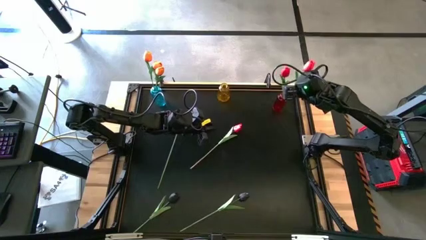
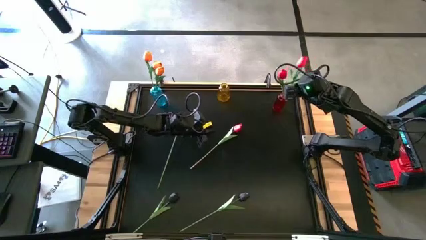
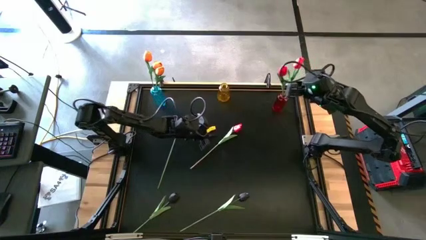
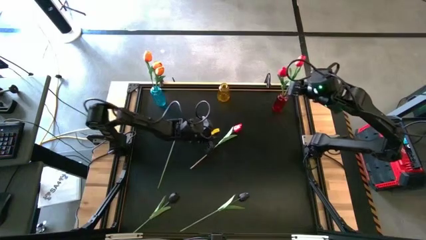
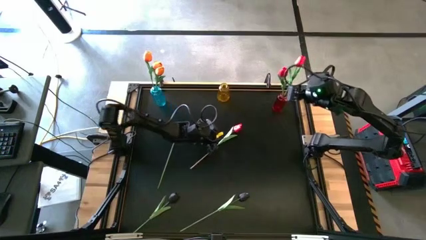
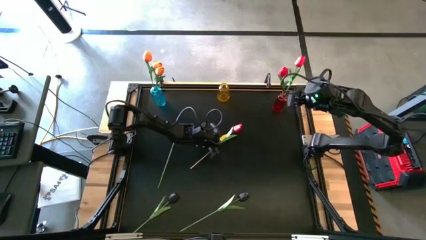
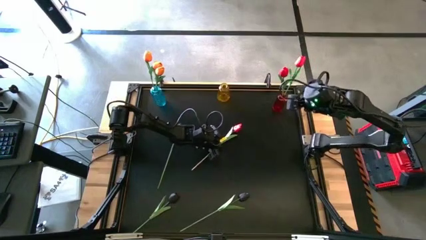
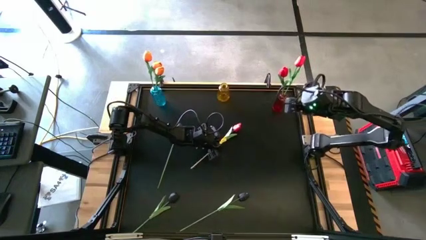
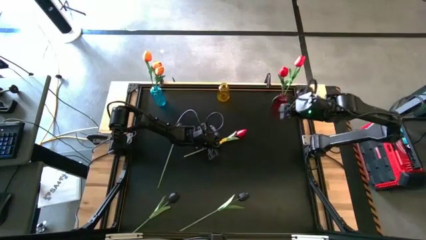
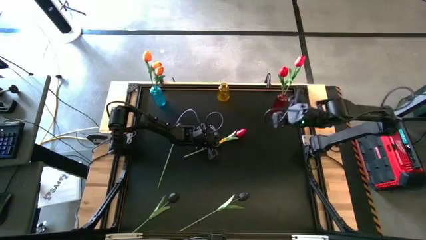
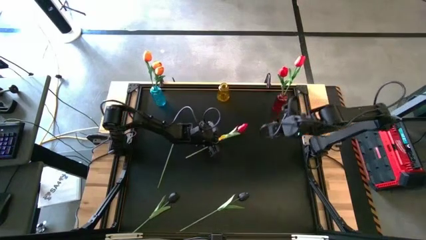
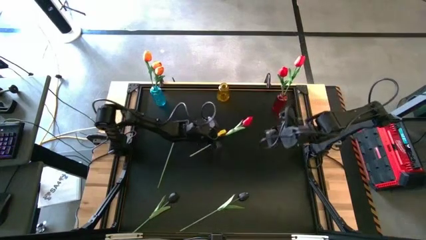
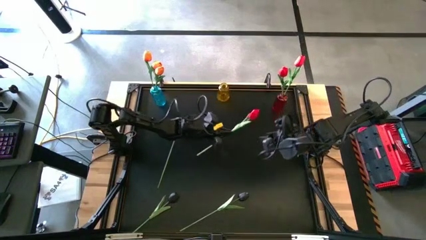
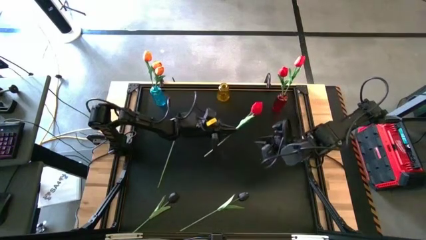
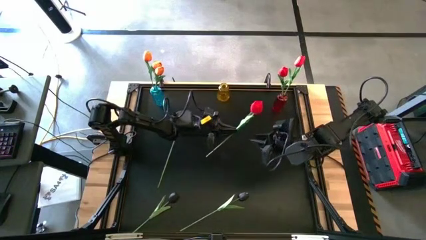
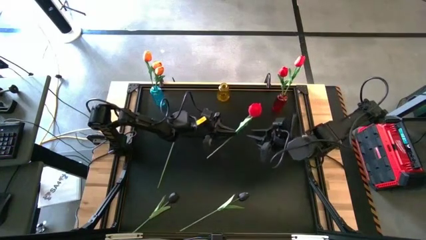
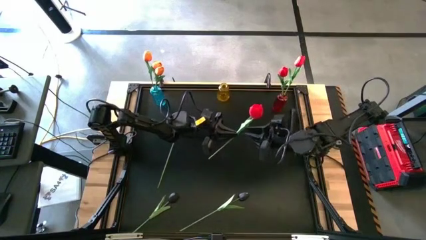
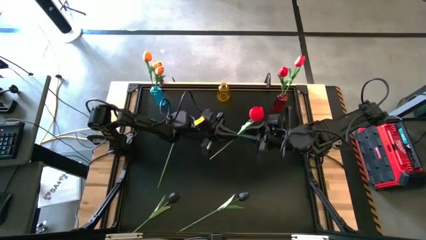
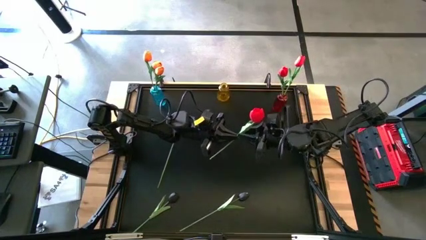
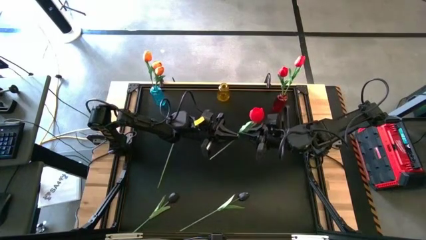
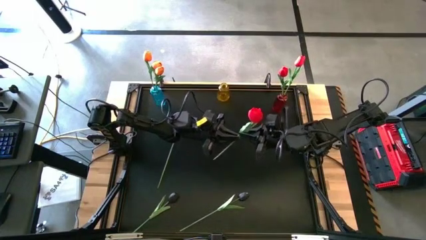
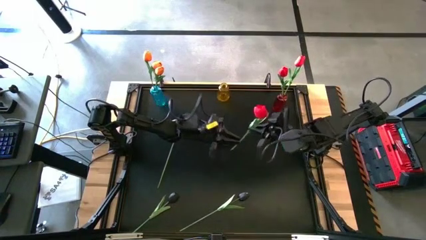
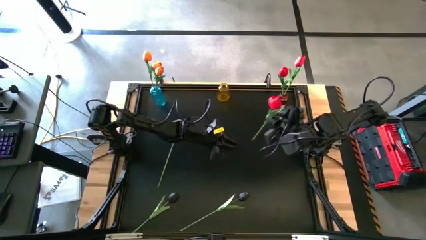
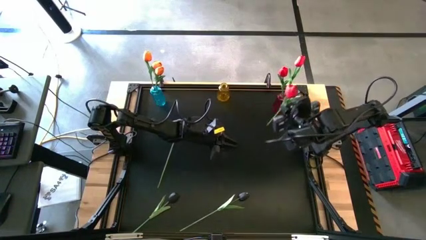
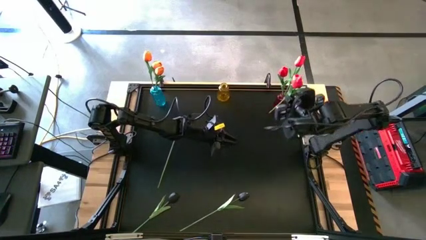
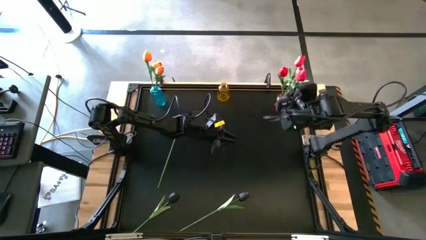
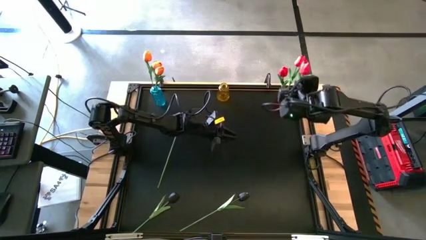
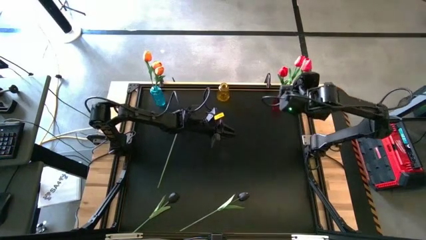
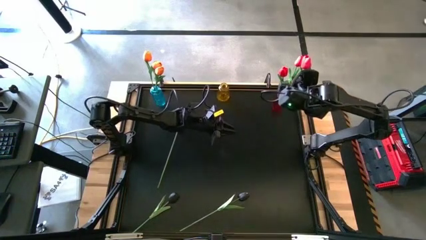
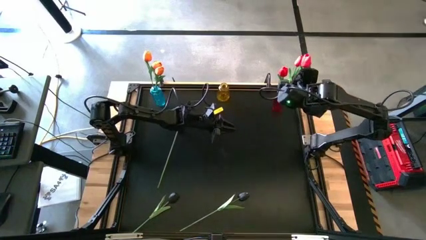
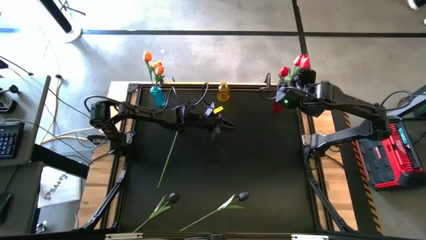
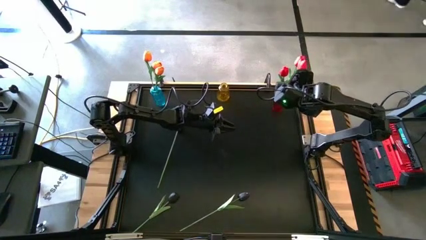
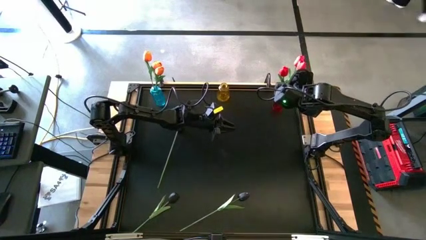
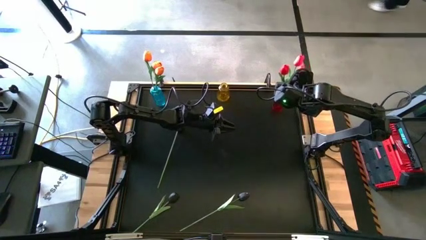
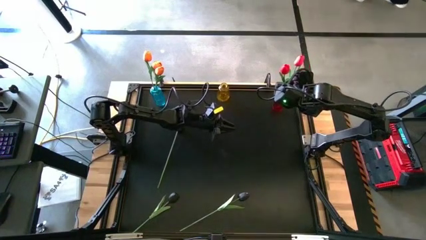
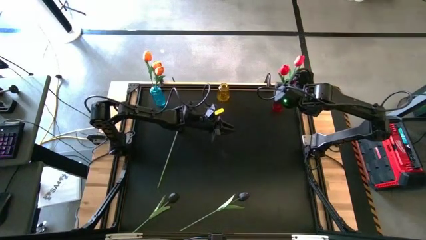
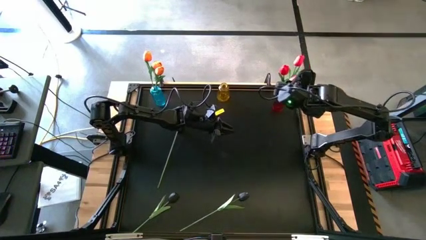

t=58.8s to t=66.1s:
Task: Sort flowers into vase by color
Put the red flower into the red vase

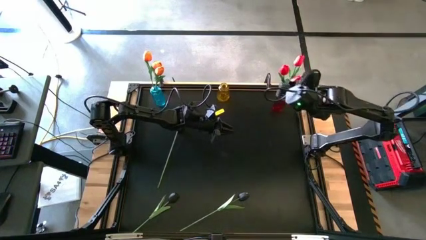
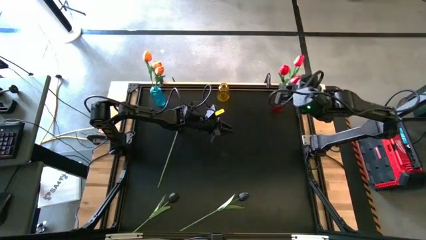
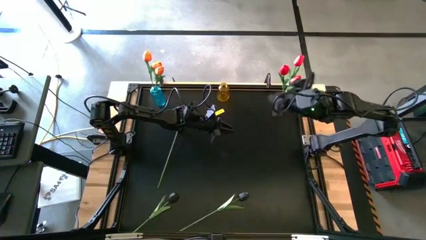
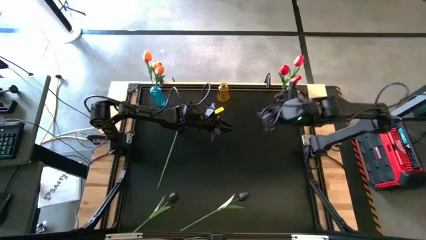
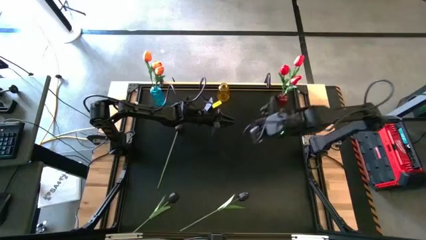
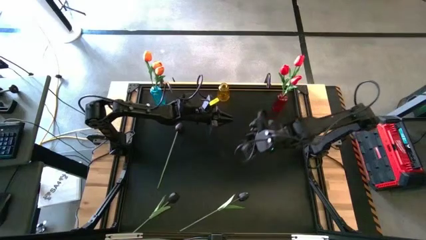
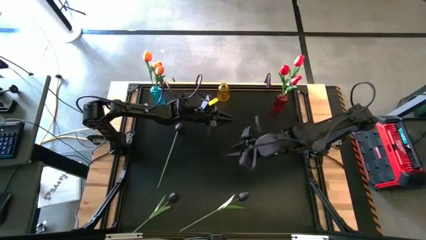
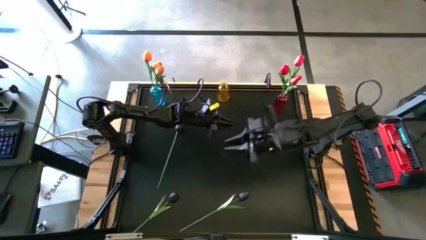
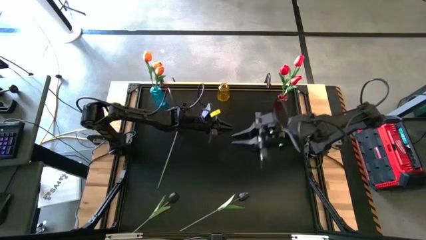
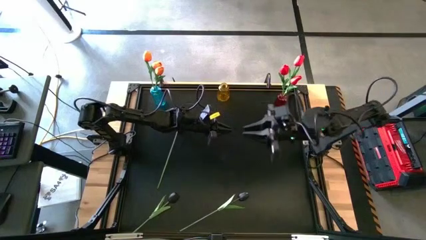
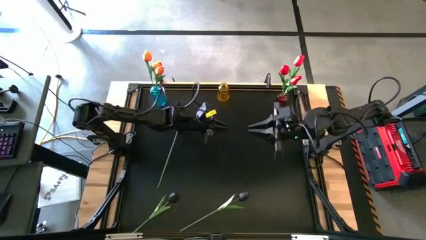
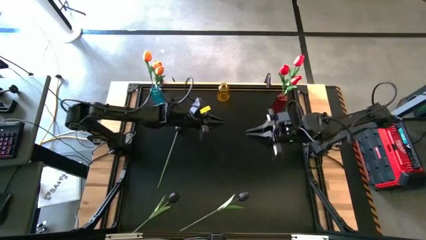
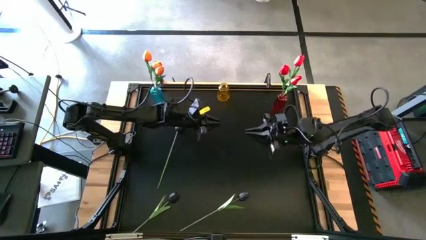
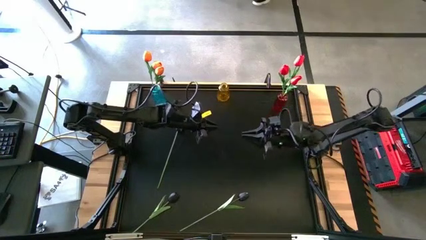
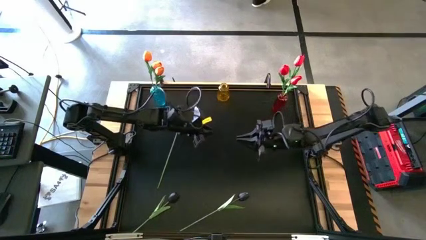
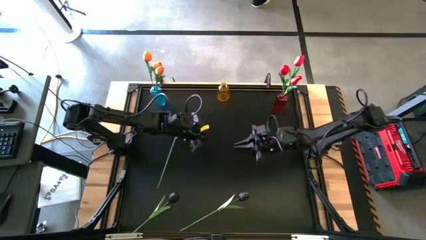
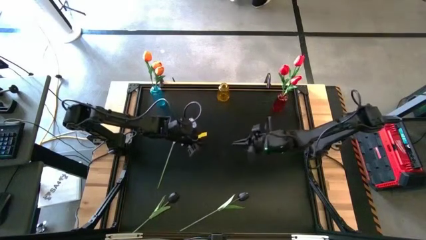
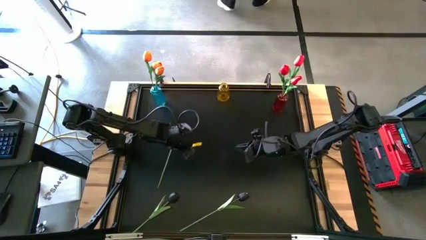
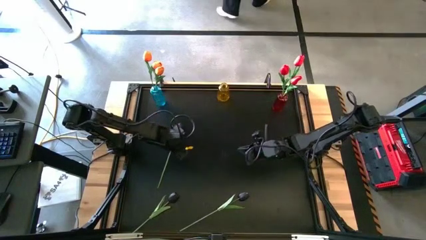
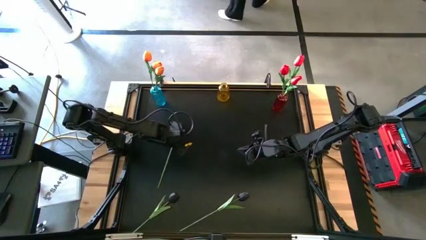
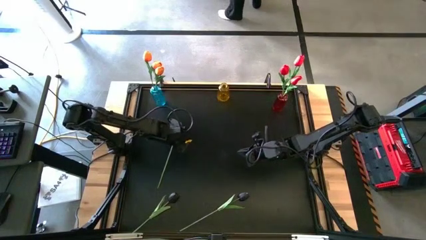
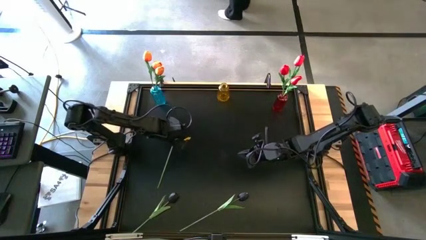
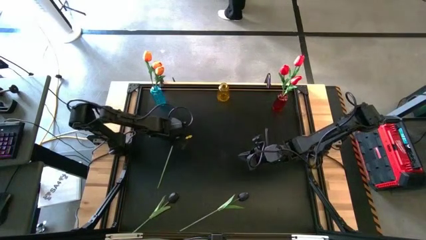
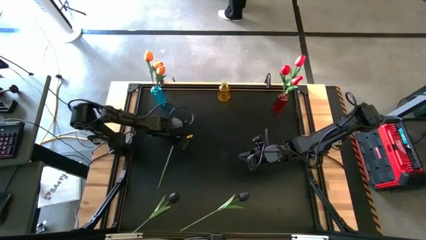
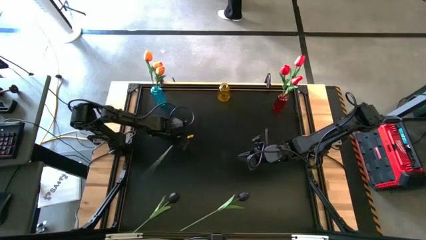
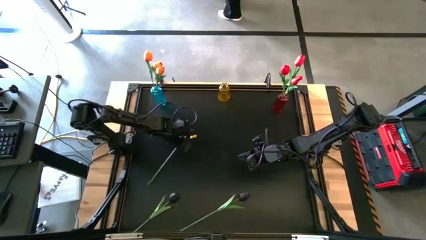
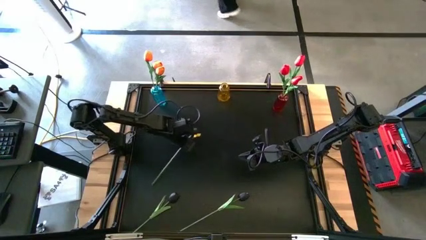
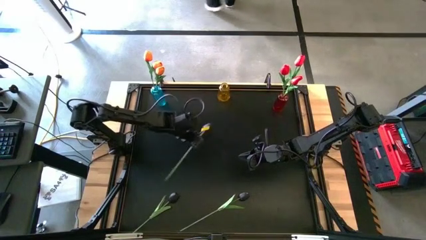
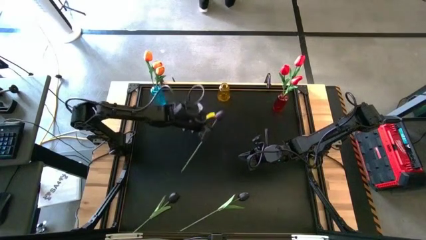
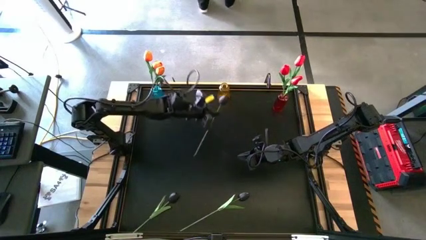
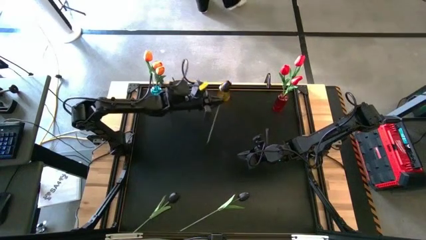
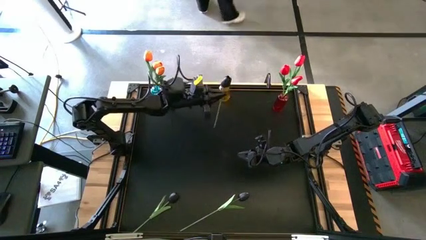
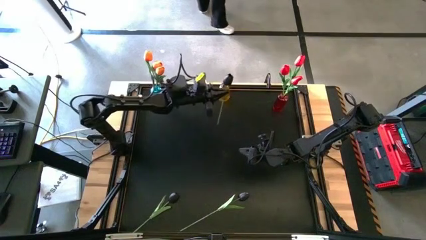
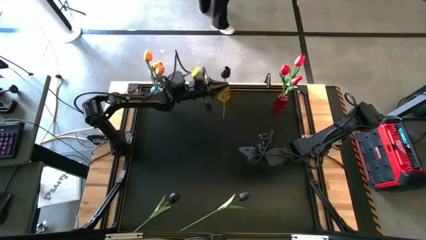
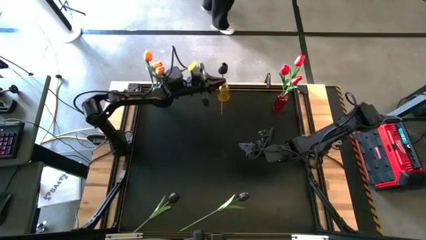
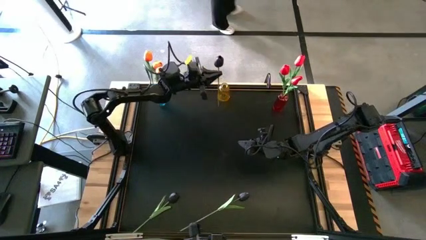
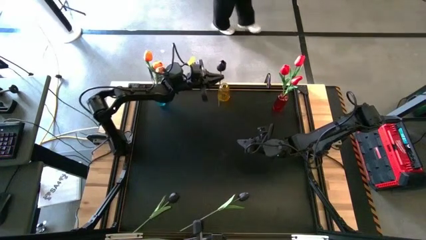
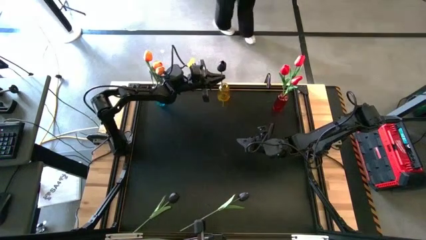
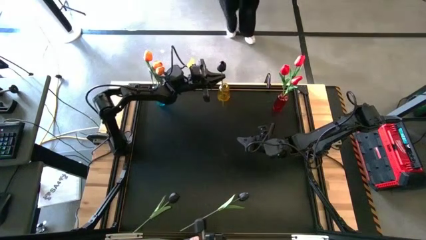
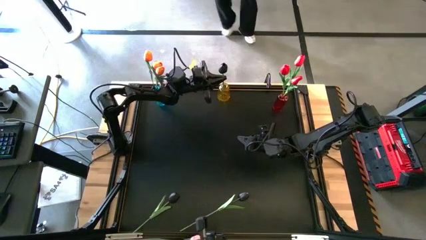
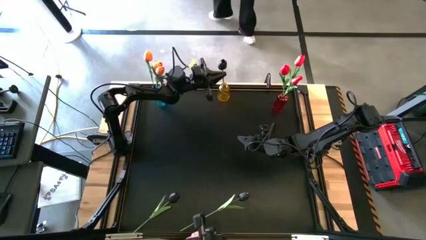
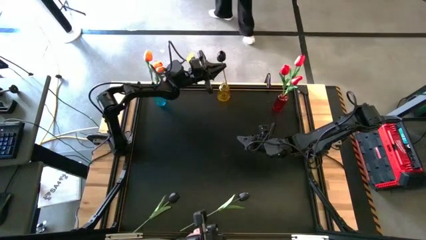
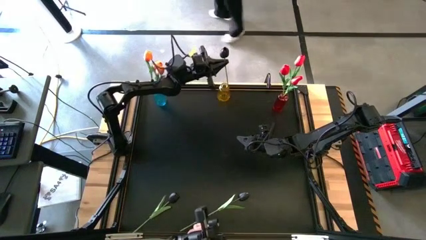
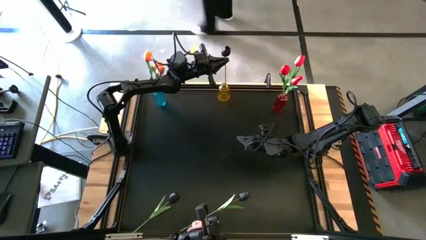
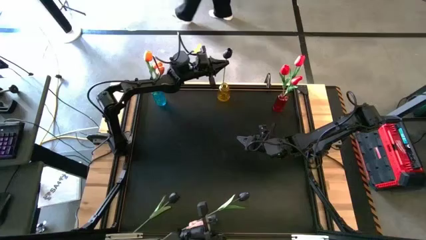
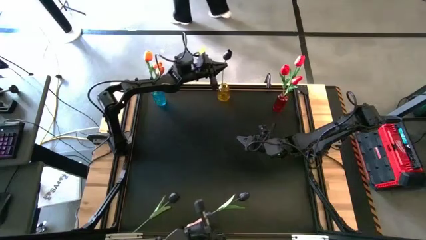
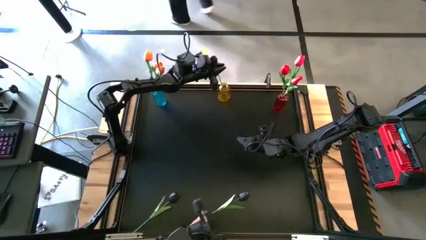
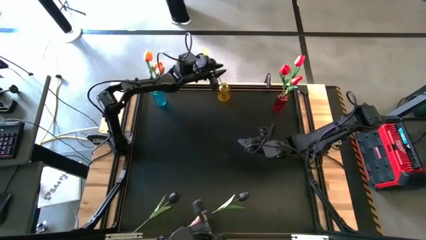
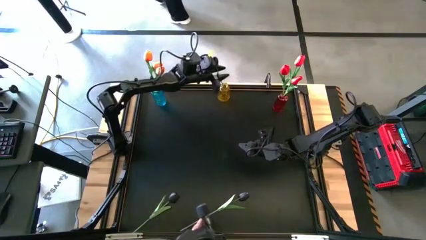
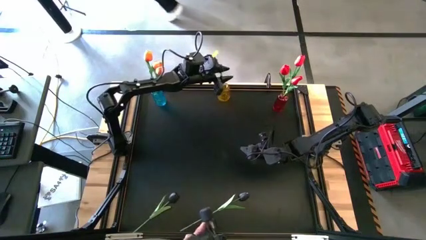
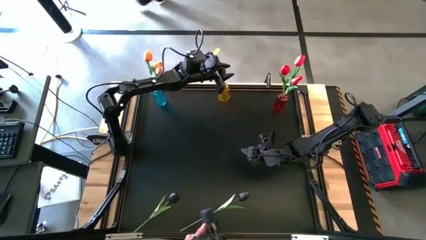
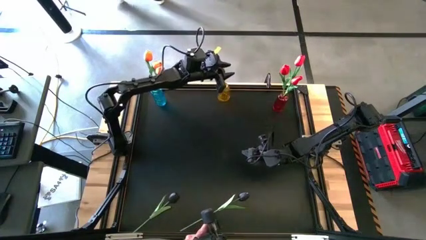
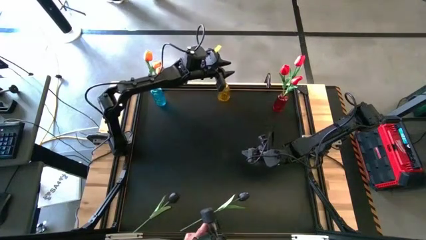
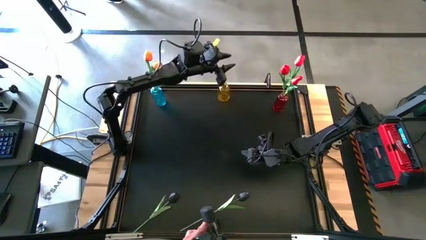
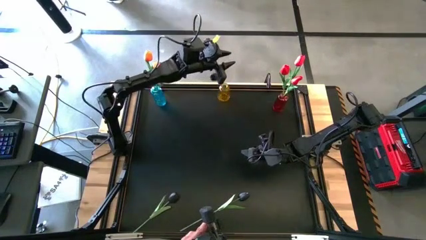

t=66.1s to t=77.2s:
Put the top left black flower into the yellow vase
